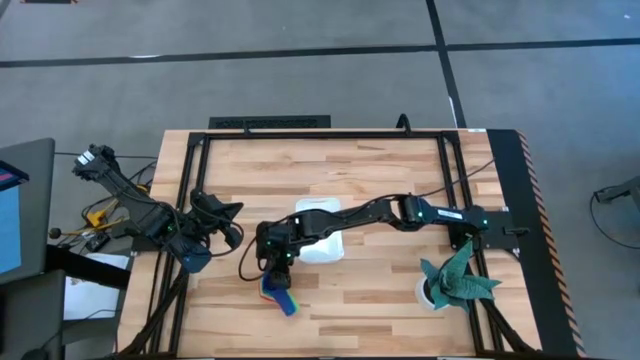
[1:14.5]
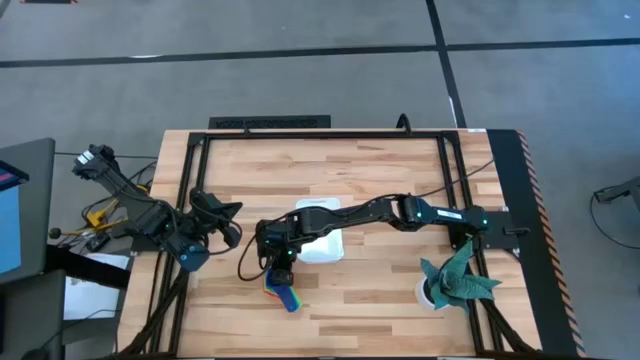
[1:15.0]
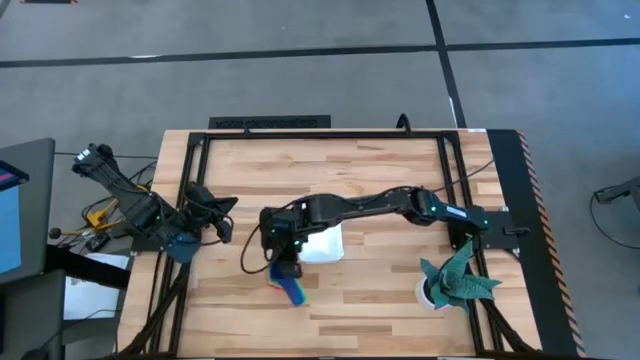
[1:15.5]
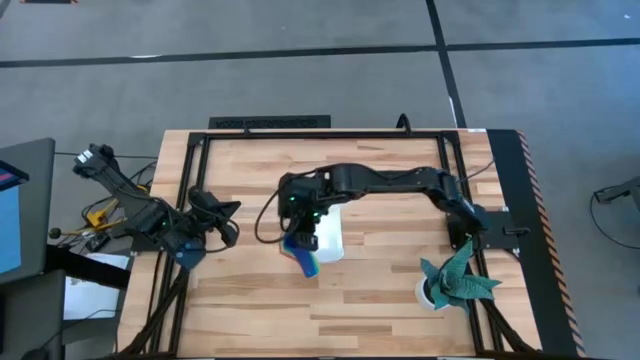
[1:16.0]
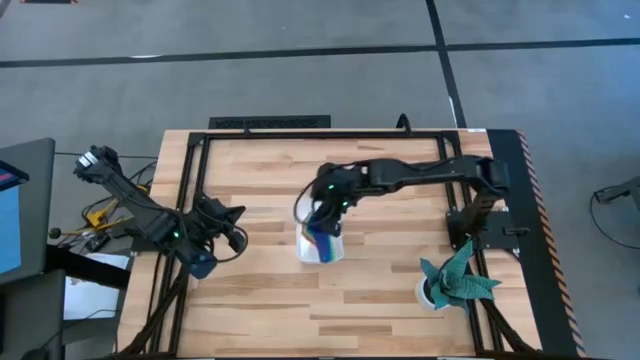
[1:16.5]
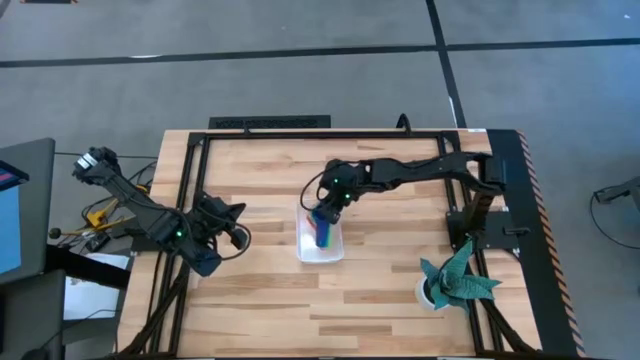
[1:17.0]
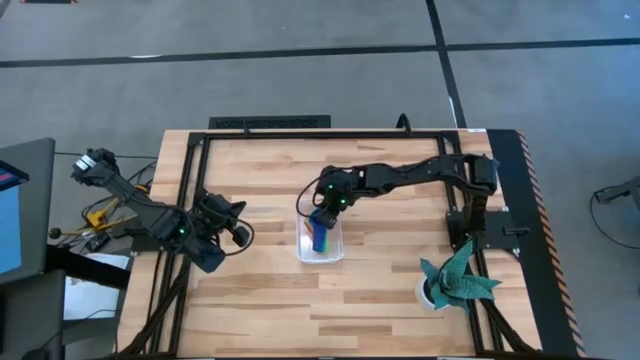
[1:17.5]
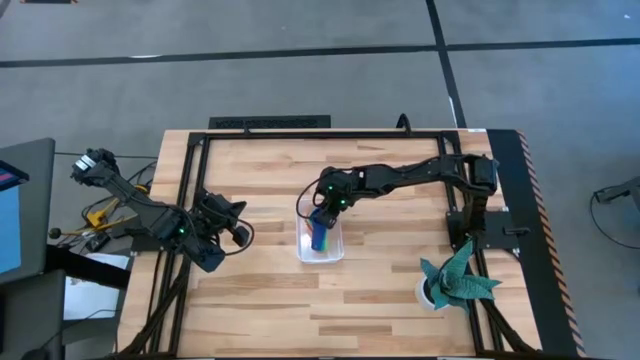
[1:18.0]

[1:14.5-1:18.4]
Task: Nest measuring cups in basket
Put the nest measuring cups into the bin

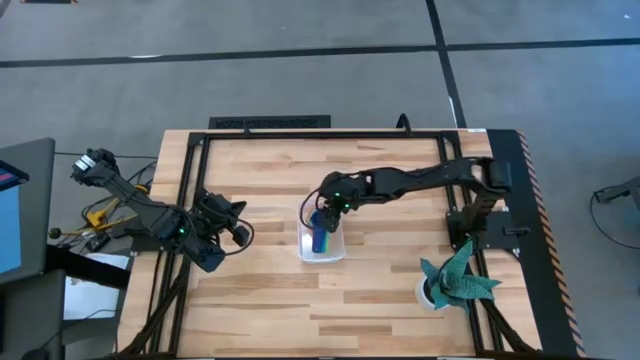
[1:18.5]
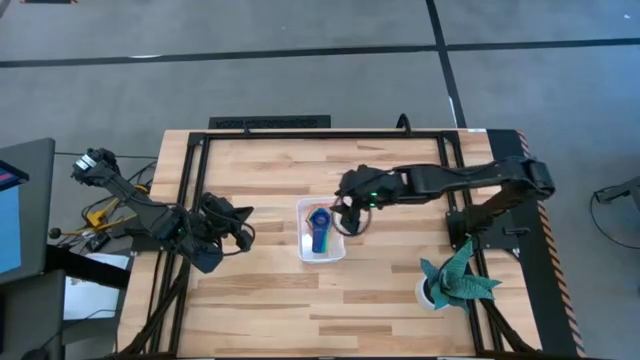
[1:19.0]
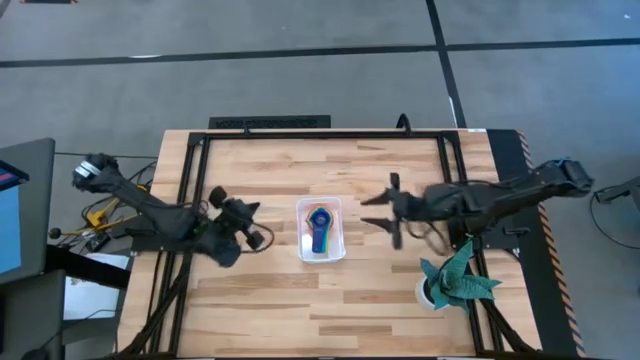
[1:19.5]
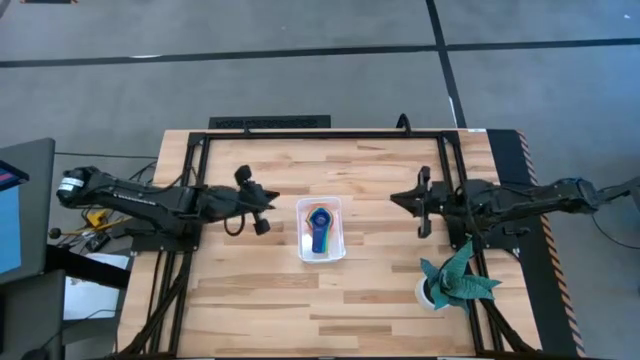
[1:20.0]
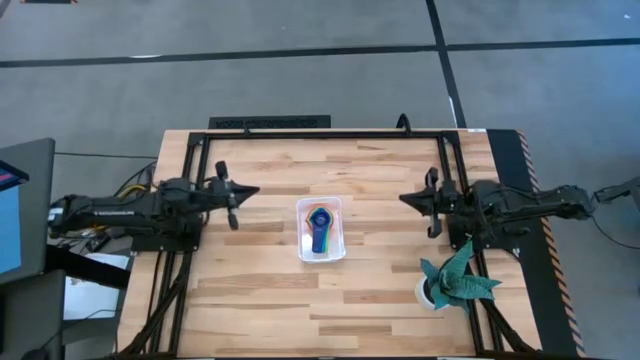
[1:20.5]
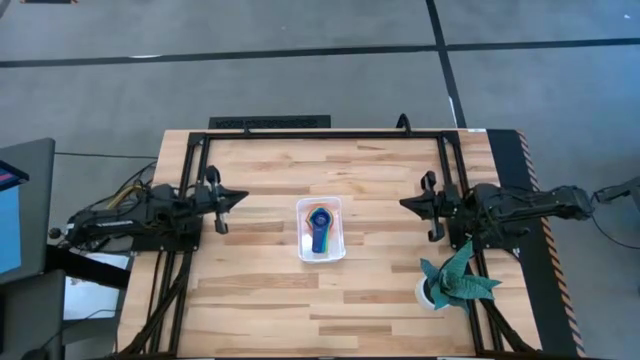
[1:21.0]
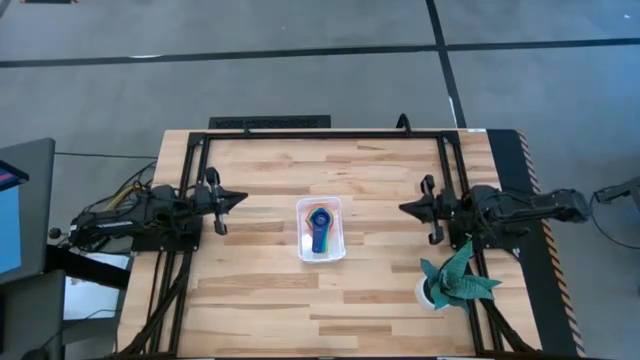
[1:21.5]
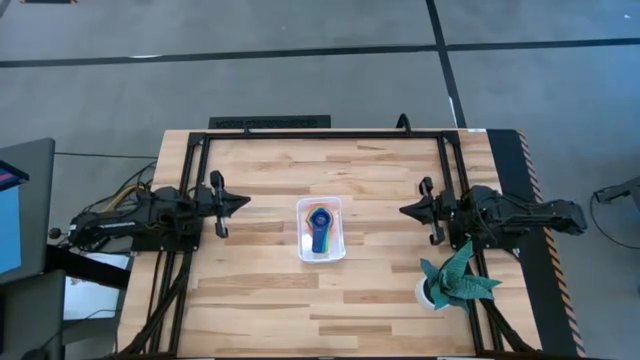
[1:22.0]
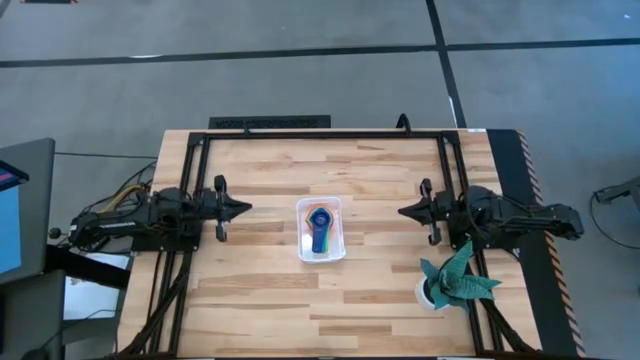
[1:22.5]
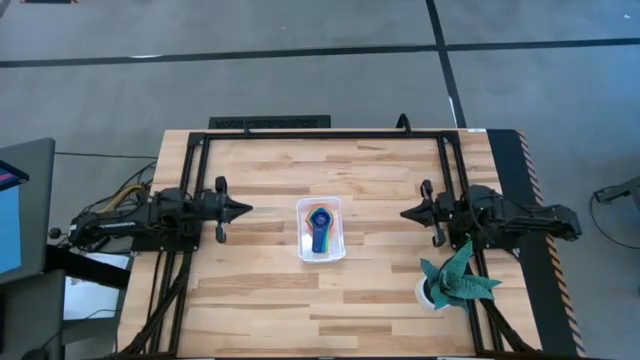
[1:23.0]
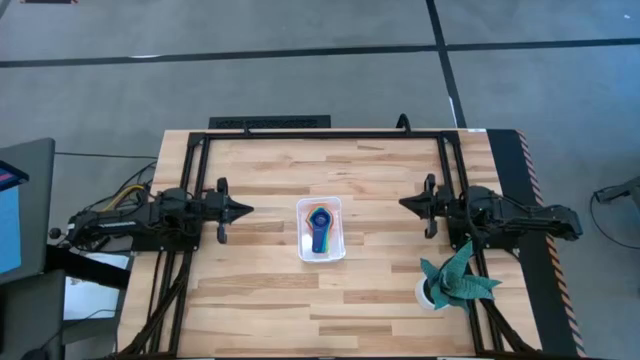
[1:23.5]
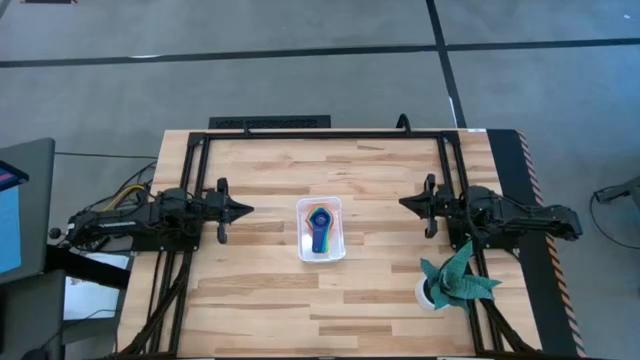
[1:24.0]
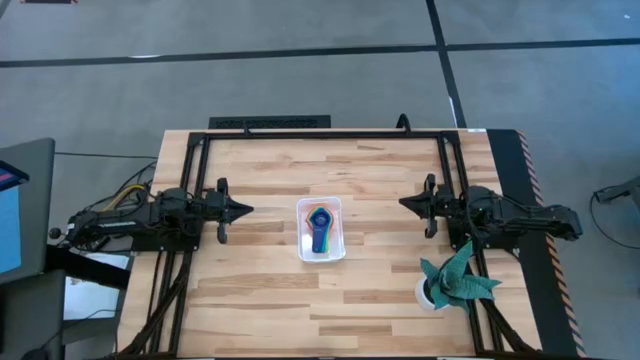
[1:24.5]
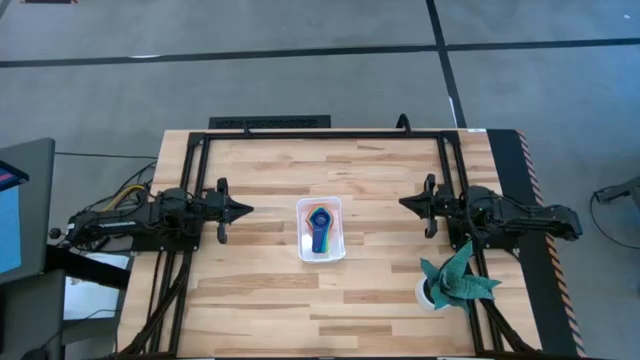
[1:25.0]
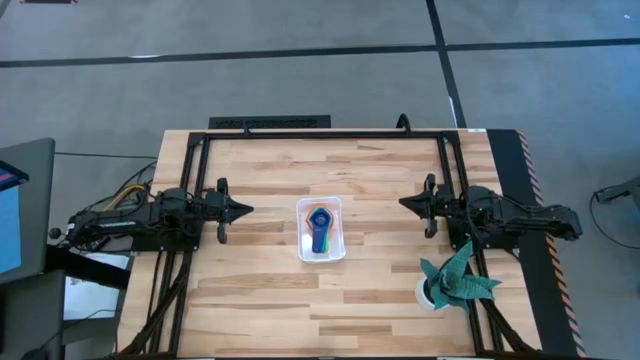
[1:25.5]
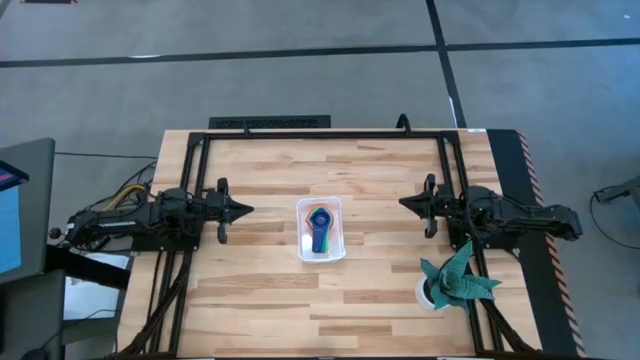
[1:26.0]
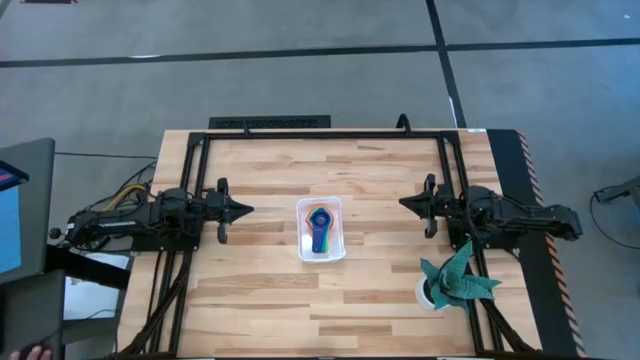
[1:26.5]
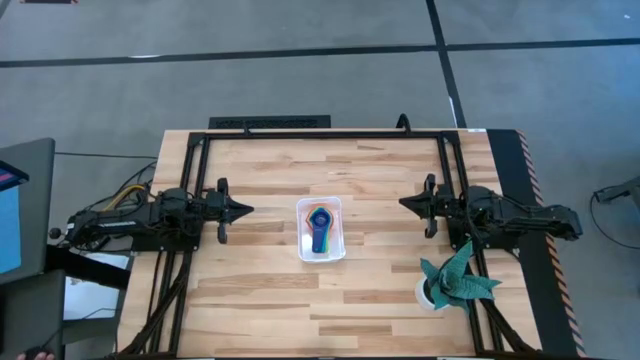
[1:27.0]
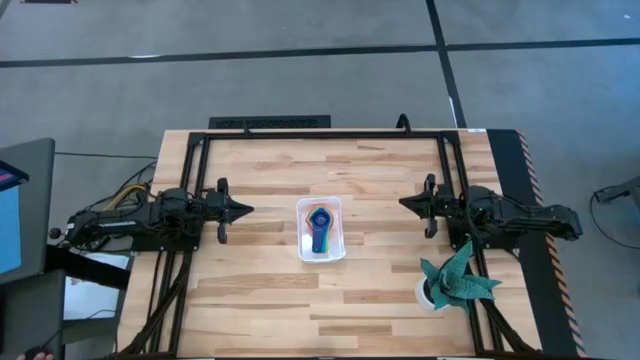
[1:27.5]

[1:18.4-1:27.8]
Return to Home Position

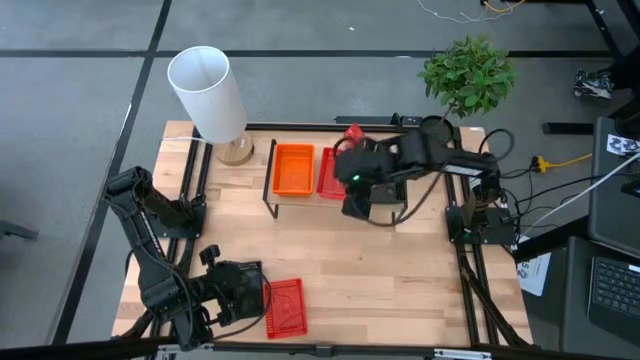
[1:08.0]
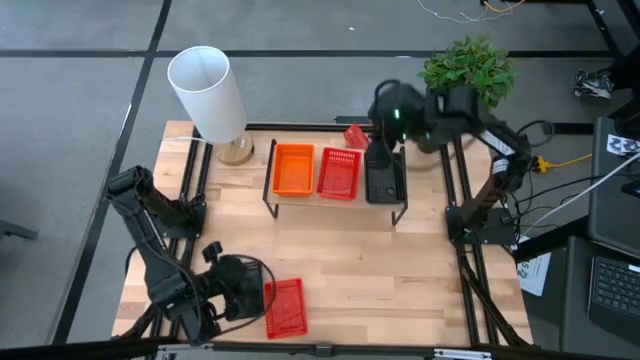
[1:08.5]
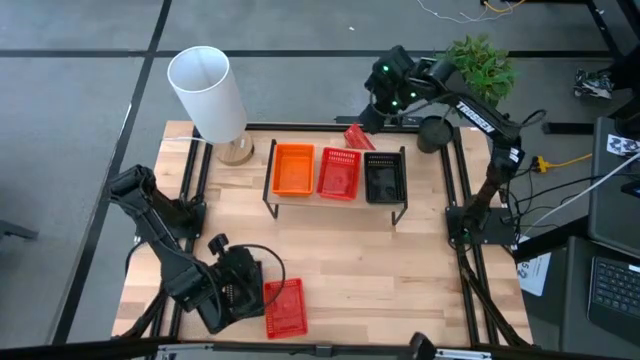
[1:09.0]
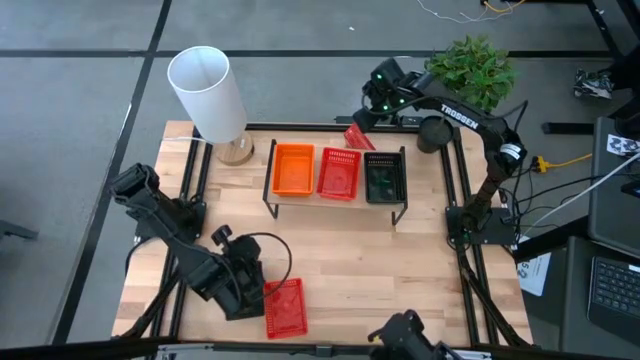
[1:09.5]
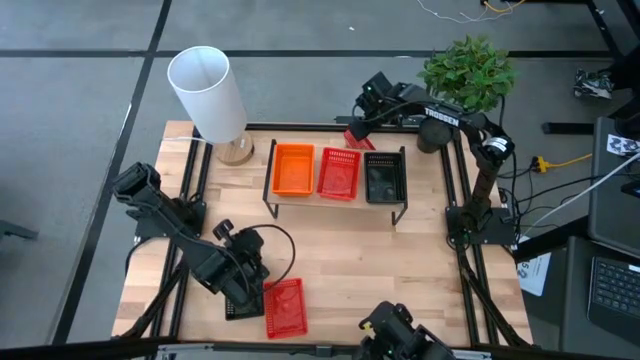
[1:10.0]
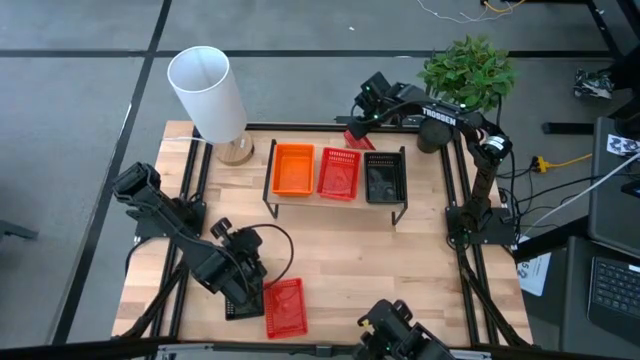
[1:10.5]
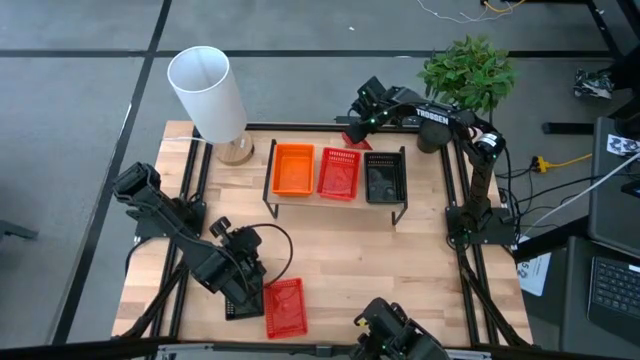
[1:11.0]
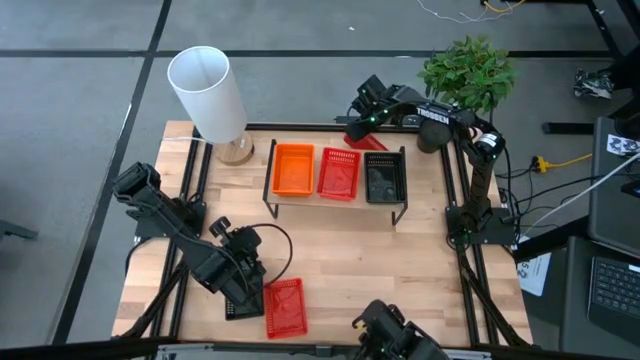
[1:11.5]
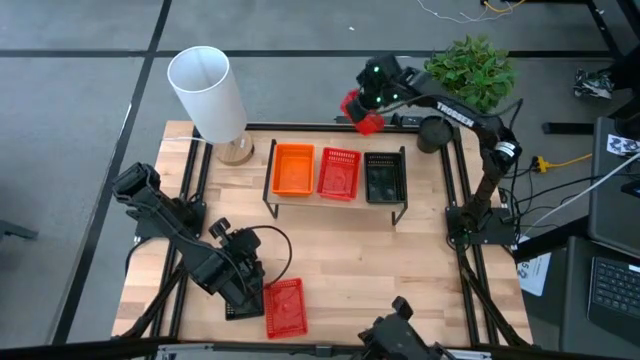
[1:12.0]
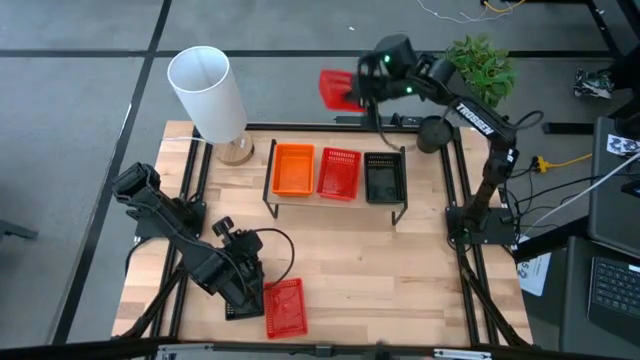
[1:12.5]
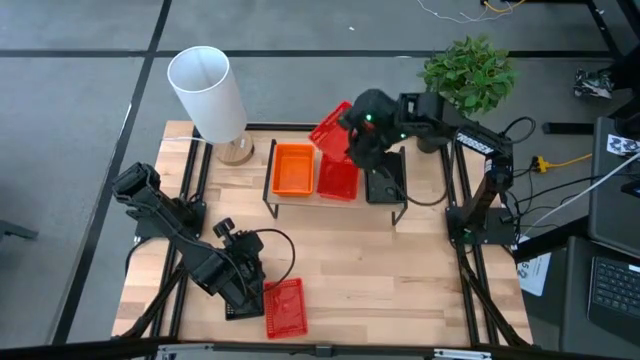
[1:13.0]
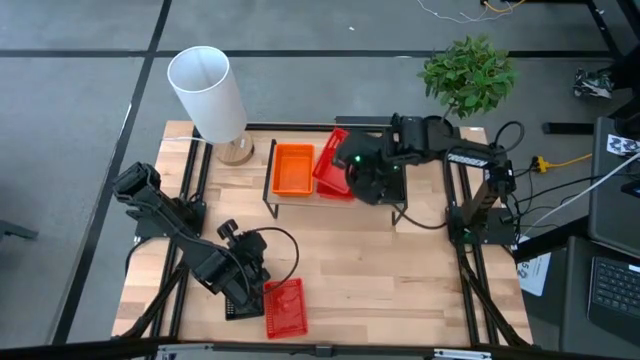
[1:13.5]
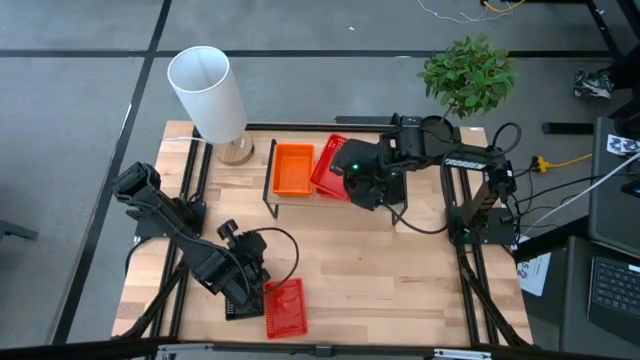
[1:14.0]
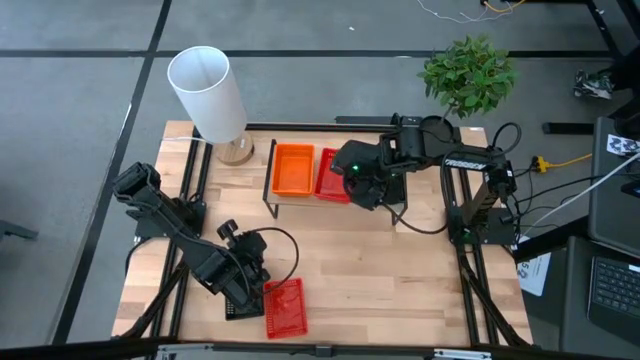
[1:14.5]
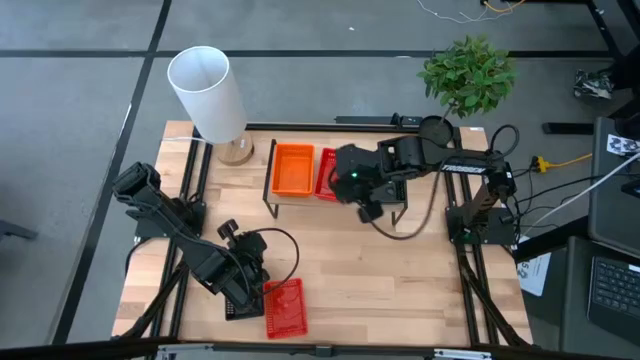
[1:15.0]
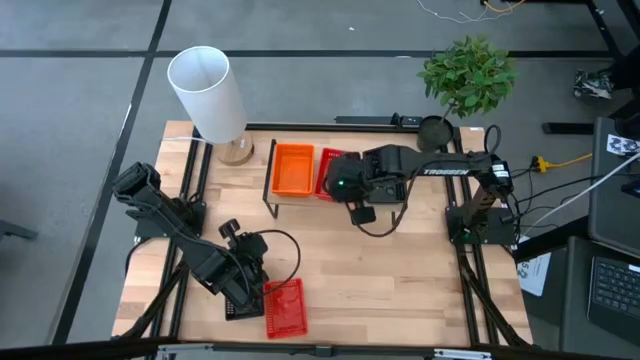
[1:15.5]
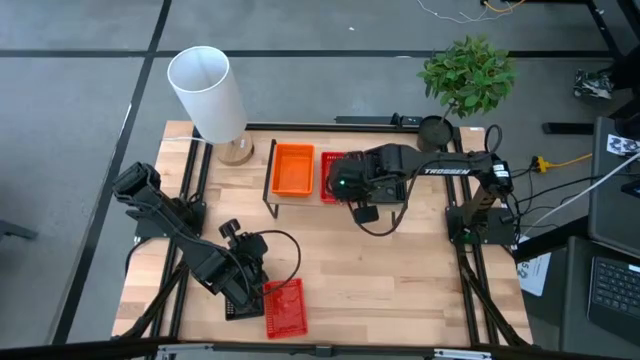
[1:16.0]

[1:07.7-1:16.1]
Task: Stack baskets on shelf by color
Stack the top red bin on top of the other red bin on the shelf

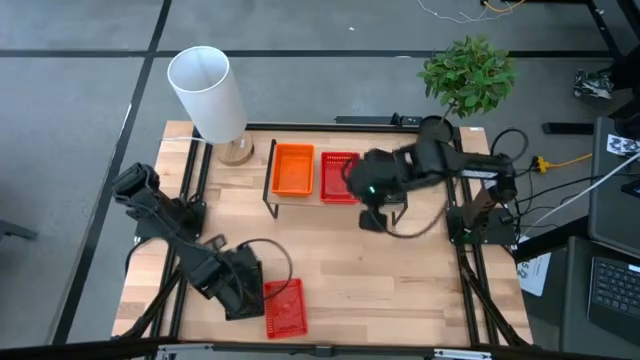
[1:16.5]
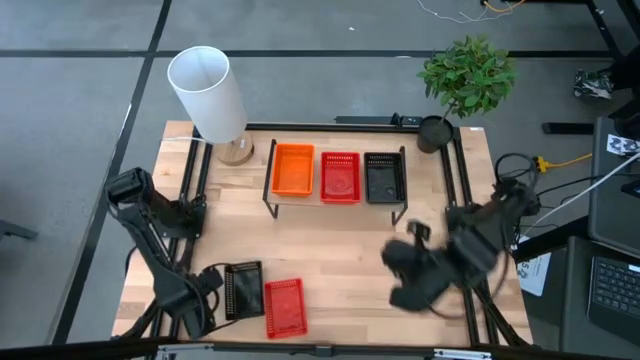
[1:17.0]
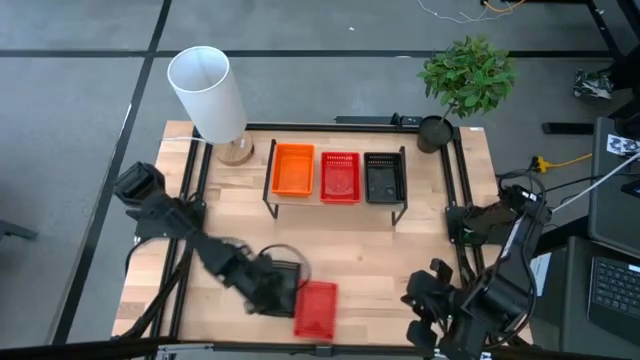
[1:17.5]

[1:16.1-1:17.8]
Adjust the bins
